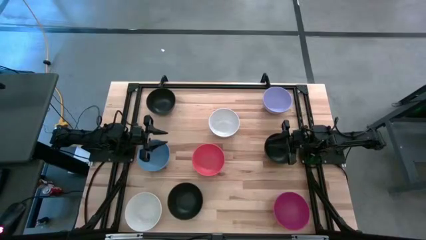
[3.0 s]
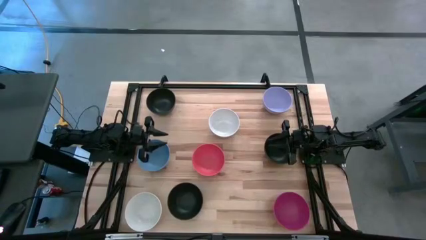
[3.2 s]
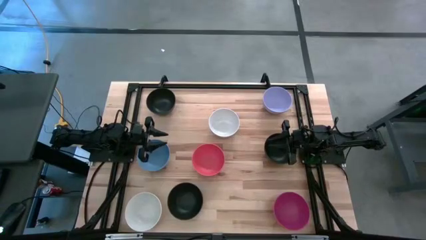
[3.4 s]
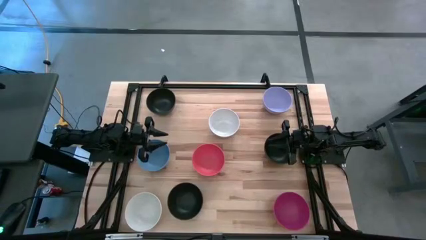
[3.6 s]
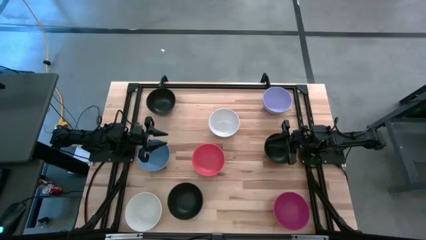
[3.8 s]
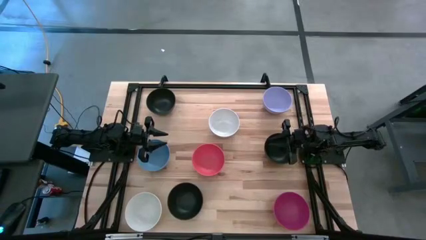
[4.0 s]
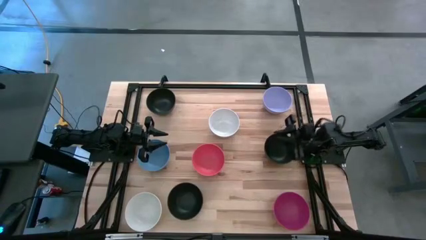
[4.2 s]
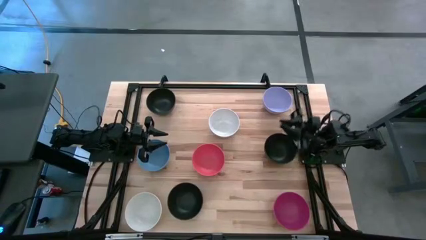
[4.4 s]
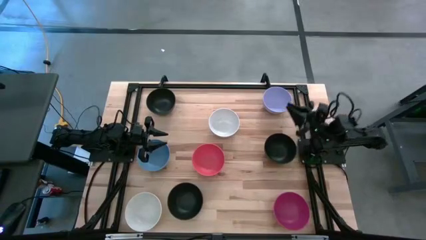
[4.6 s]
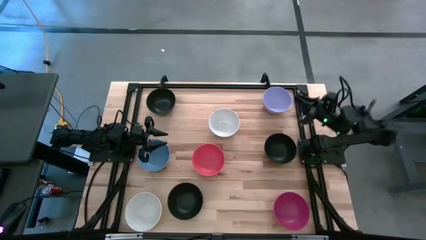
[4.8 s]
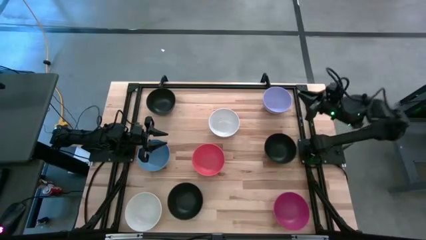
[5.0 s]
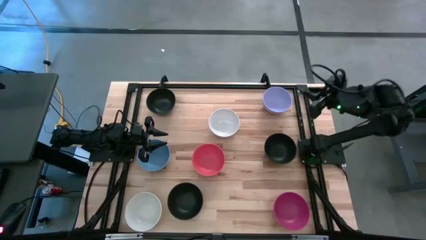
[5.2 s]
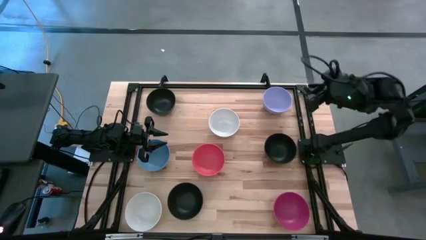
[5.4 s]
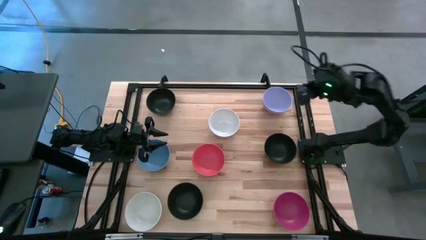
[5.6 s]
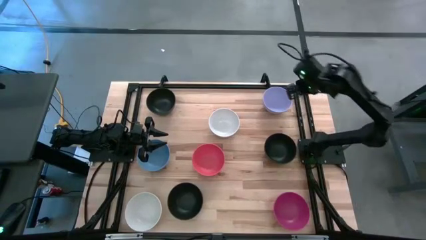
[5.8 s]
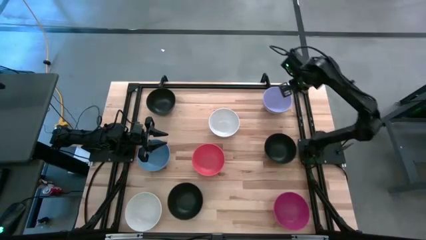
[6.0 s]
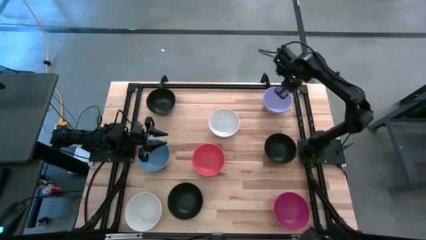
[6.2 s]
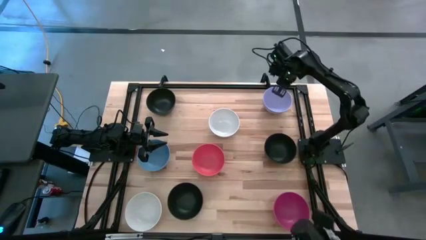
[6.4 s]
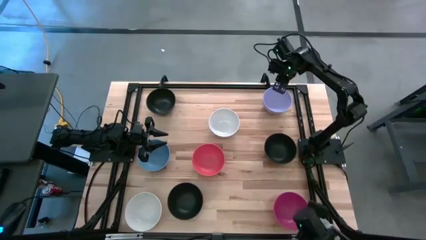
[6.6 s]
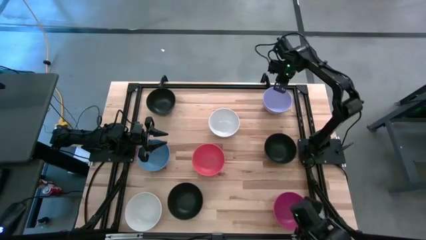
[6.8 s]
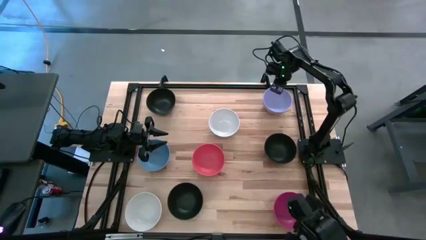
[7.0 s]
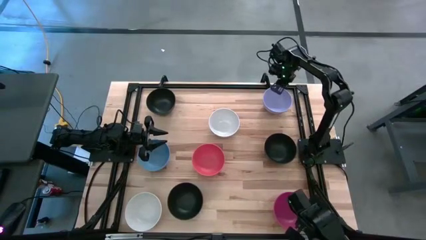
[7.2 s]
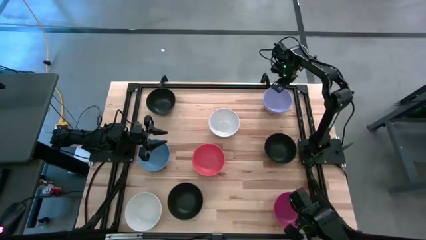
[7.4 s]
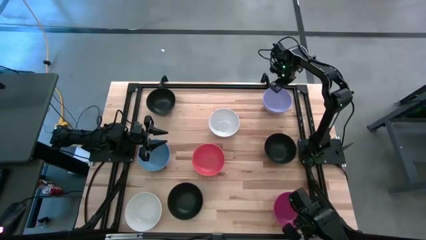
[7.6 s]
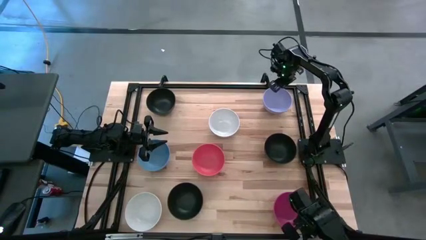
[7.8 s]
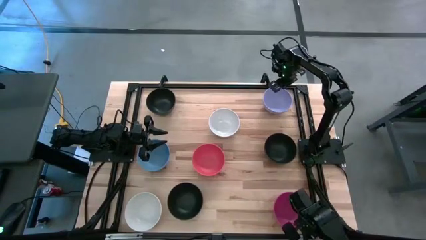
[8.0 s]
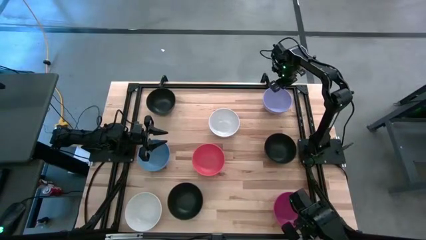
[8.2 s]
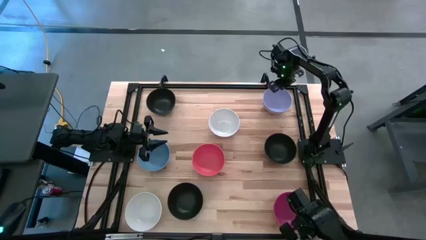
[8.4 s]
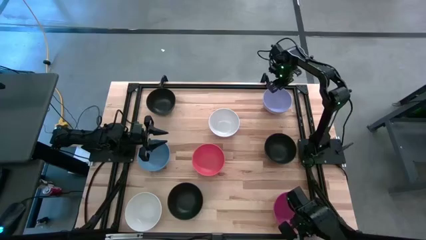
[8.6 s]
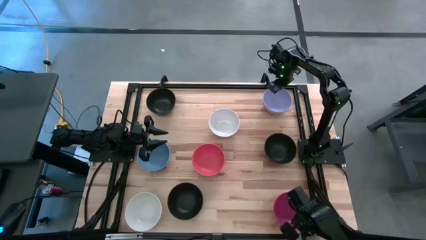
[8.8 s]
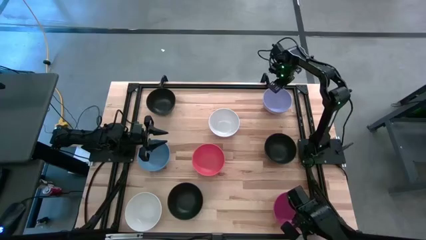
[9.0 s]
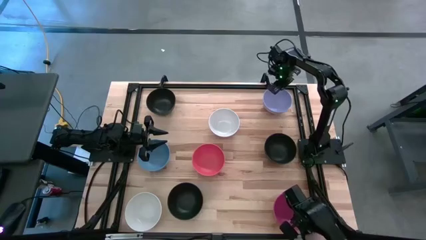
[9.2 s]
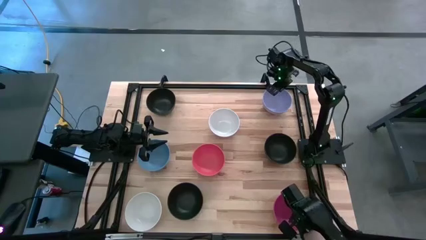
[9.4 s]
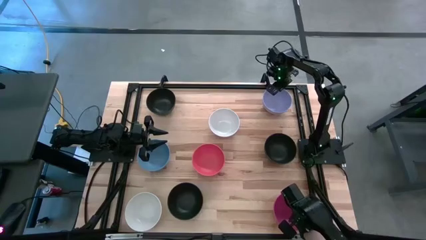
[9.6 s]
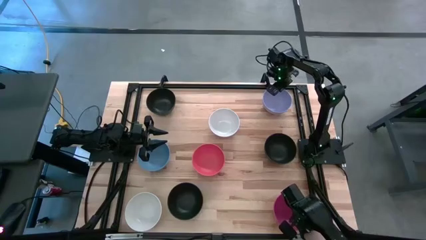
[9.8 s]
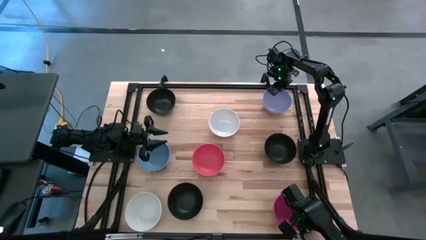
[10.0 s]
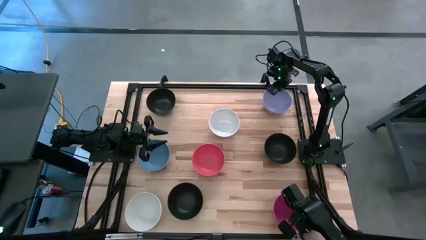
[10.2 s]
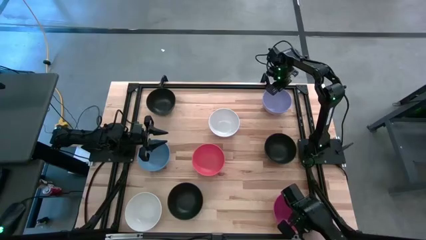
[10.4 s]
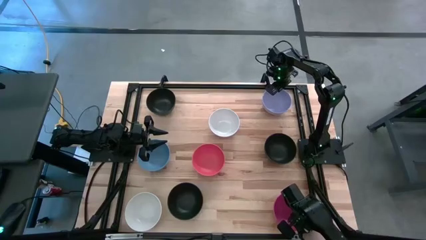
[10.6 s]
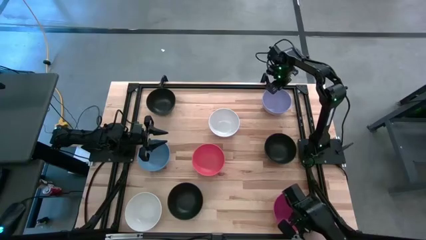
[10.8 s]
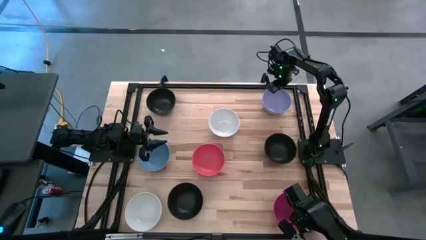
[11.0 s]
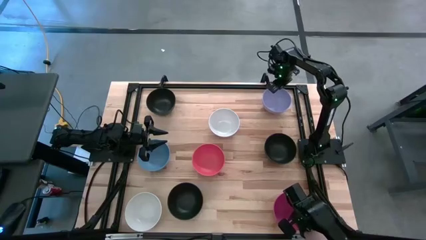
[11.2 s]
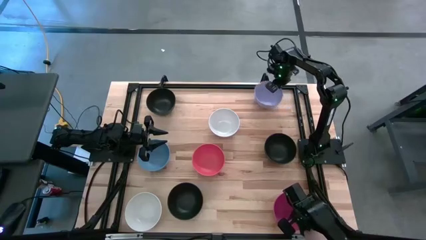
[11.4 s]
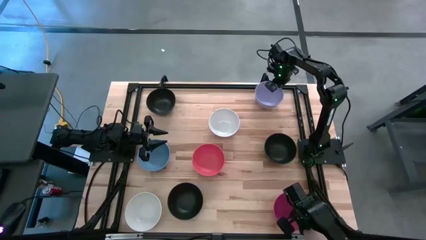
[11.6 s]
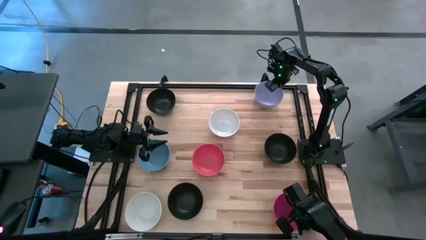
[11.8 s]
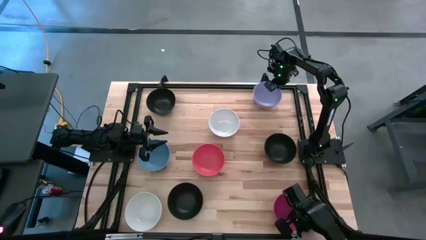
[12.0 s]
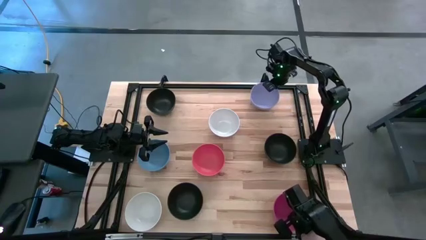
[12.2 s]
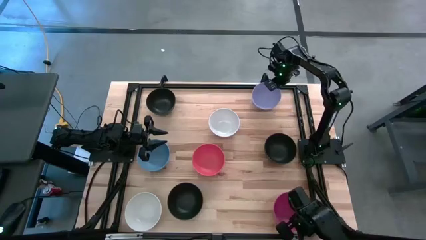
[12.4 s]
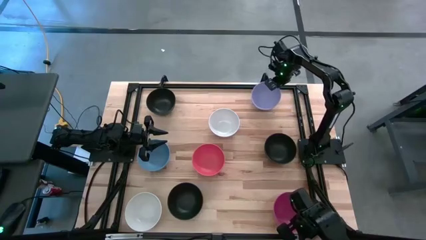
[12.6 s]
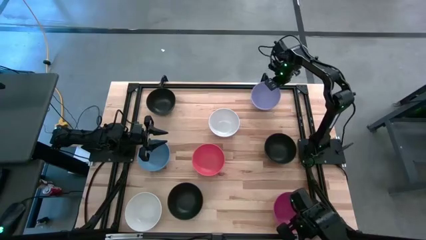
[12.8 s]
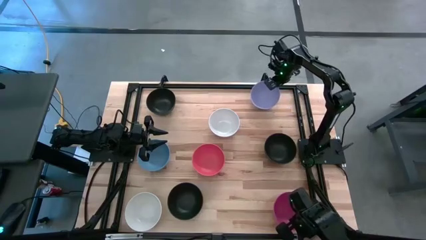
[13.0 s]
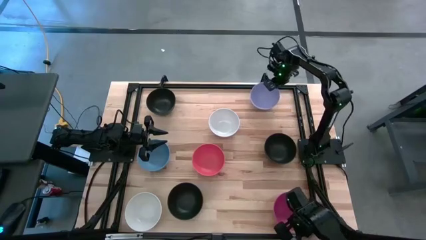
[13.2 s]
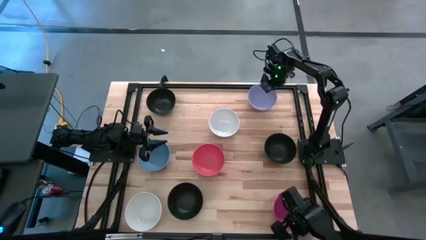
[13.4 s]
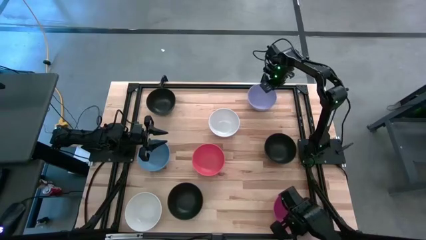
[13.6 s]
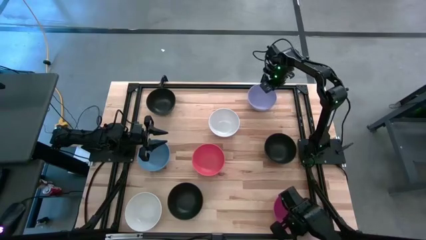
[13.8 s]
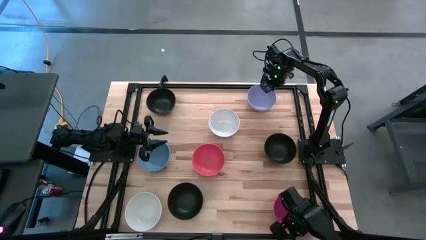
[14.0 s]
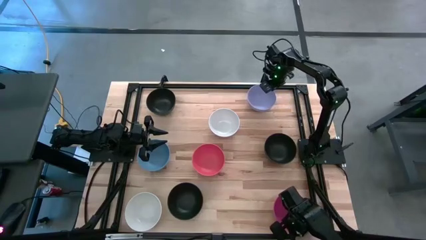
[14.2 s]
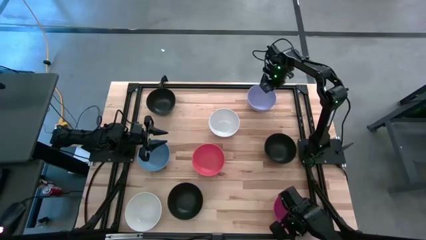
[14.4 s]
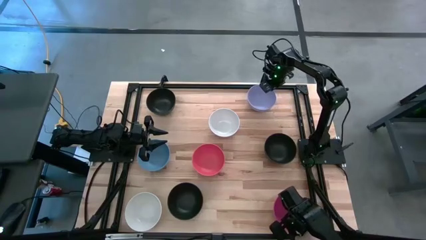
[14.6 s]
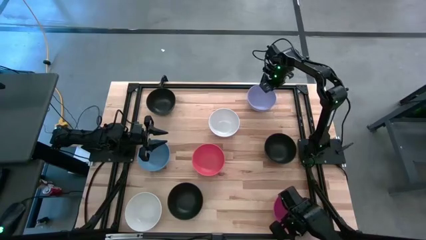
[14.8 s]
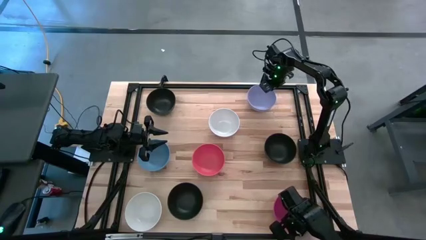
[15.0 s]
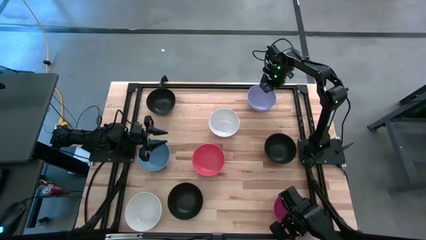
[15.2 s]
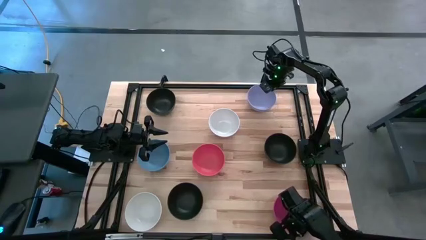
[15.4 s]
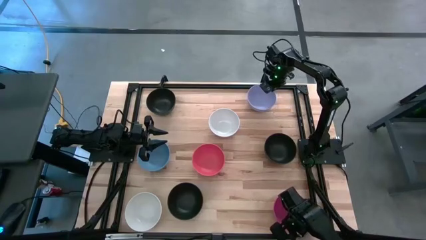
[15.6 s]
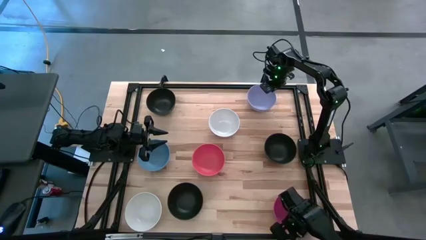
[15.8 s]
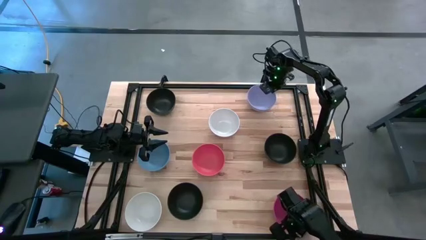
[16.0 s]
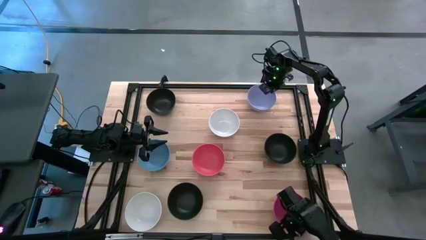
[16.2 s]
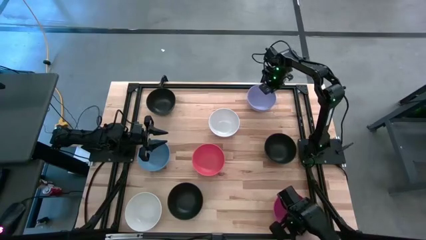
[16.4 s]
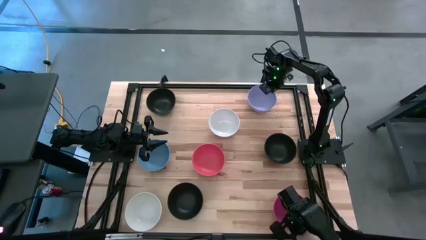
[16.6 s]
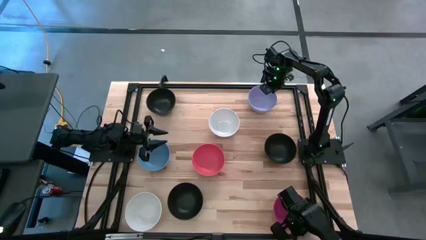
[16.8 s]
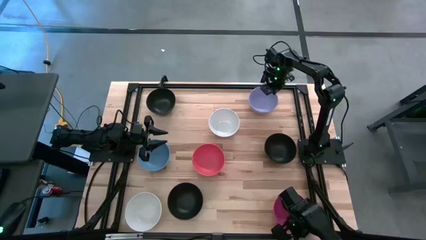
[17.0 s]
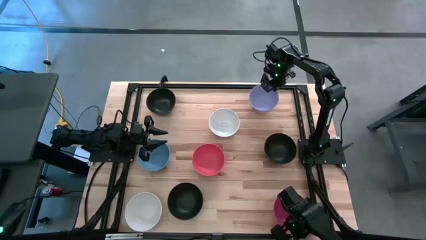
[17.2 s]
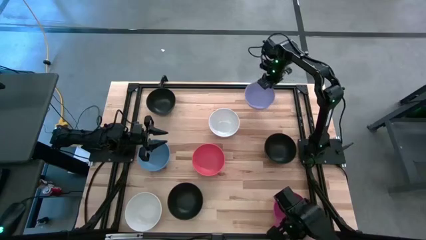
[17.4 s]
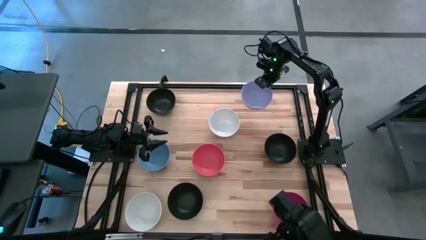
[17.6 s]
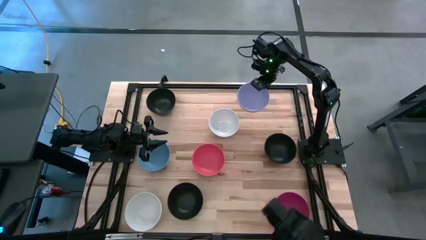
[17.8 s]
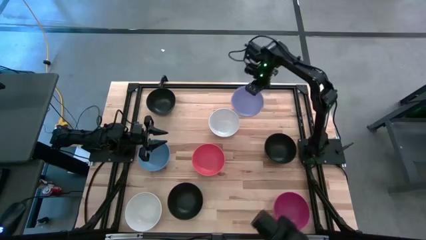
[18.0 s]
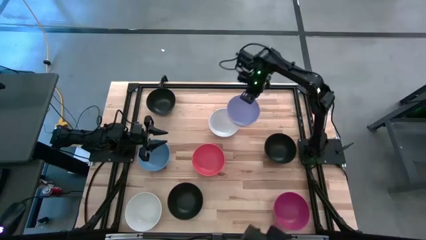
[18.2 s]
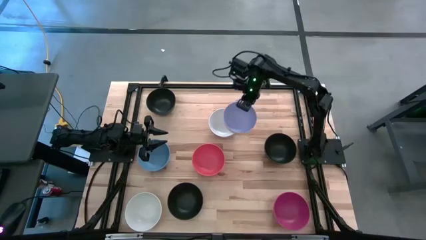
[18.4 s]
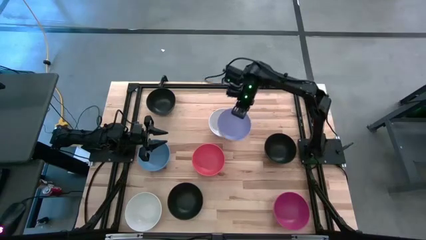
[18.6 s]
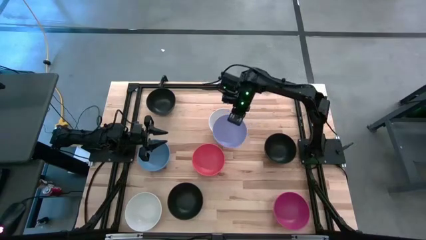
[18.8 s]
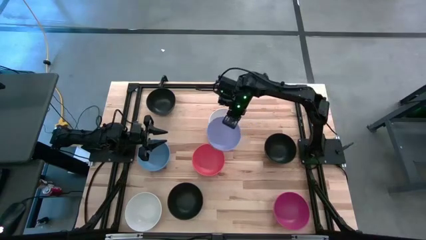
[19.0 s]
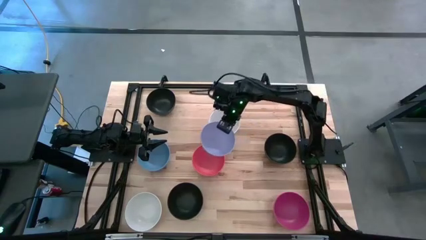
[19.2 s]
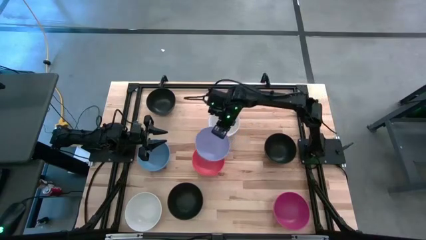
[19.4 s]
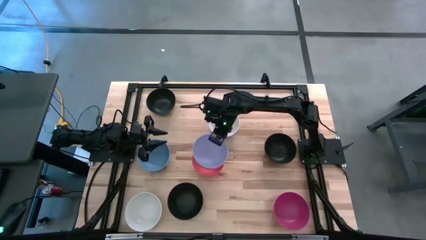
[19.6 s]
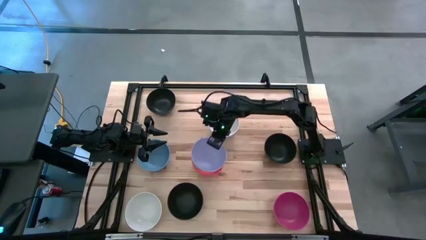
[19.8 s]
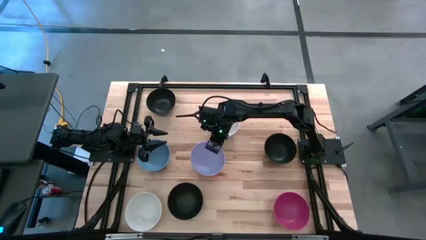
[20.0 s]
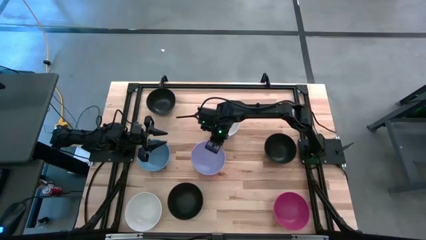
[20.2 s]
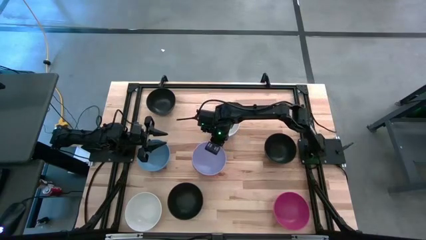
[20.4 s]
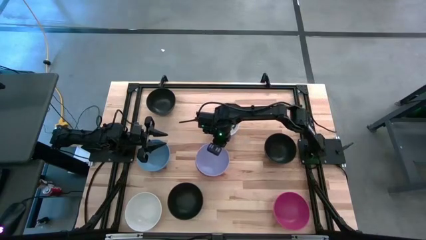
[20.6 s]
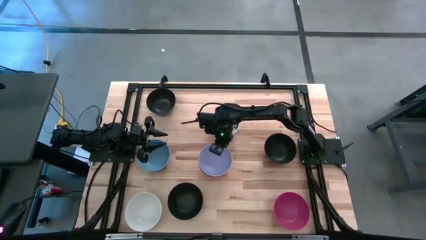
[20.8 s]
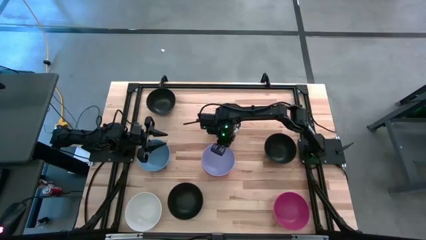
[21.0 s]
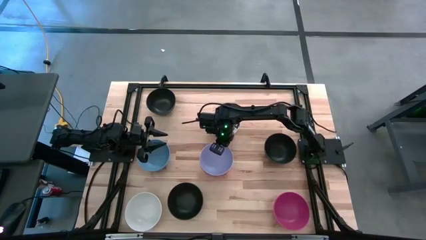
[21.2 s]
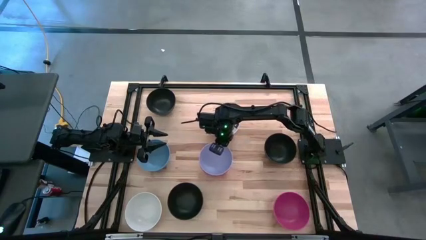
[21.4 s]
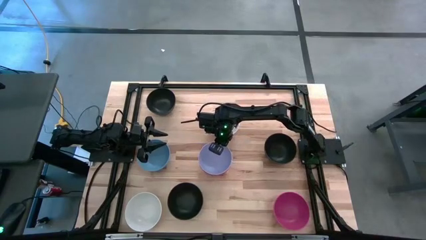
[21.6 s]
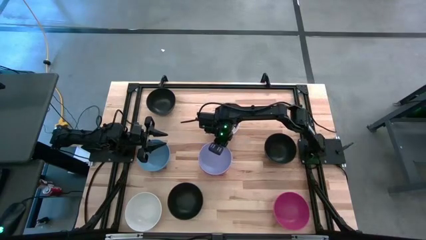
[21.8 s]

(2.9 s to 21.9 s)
Task: Nest bowls inside each other
Stack the purple bowl on the orange bowl
